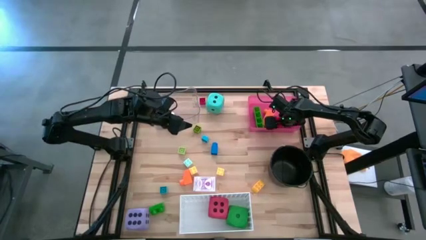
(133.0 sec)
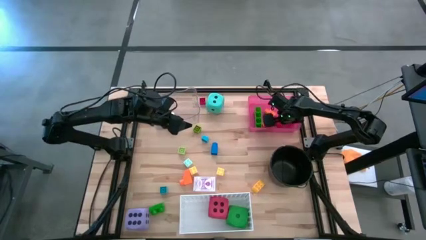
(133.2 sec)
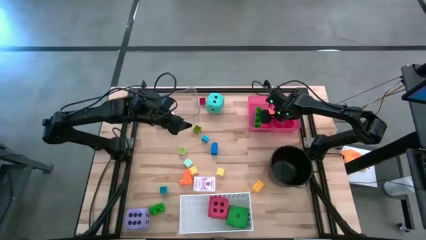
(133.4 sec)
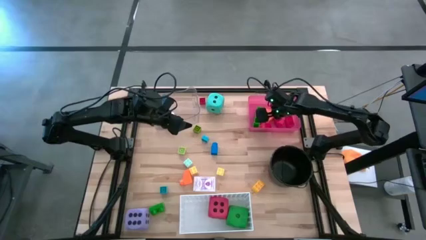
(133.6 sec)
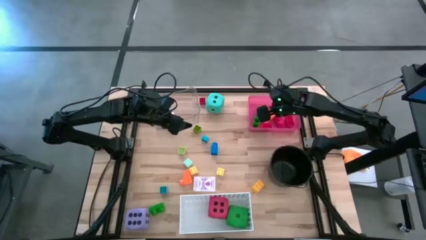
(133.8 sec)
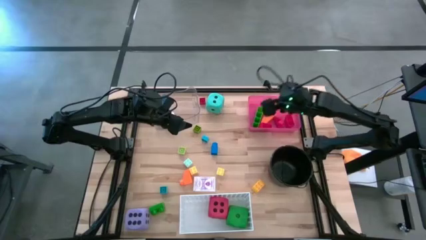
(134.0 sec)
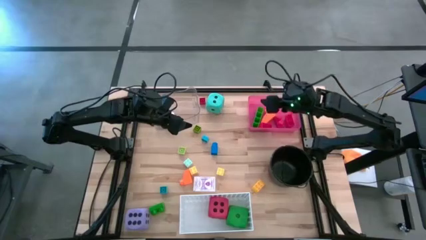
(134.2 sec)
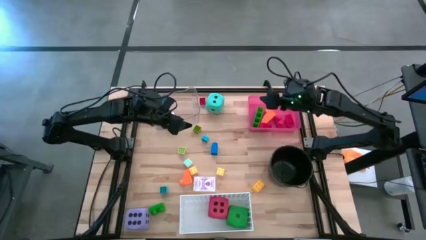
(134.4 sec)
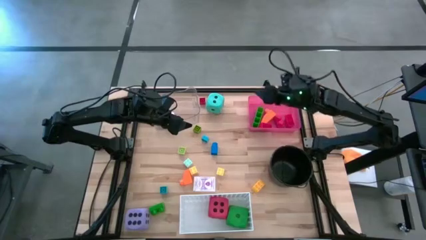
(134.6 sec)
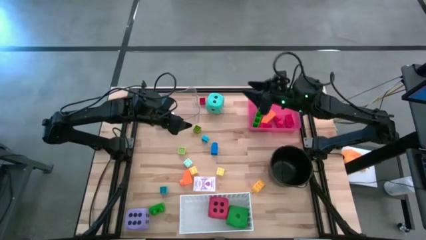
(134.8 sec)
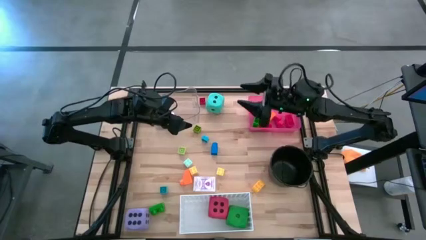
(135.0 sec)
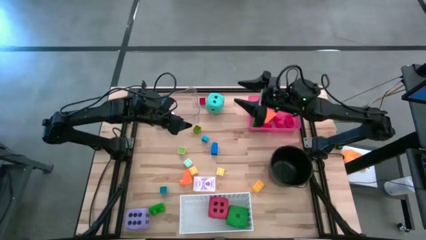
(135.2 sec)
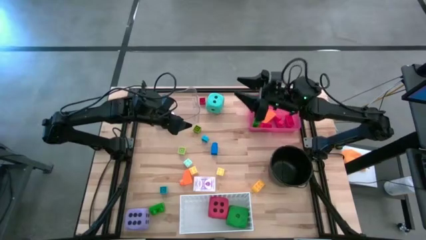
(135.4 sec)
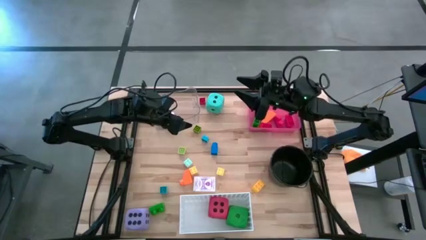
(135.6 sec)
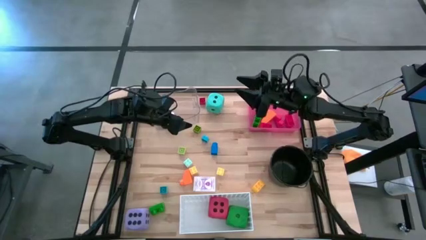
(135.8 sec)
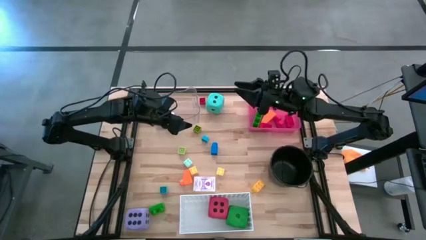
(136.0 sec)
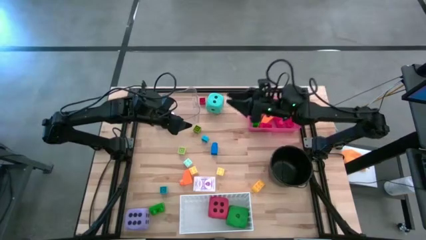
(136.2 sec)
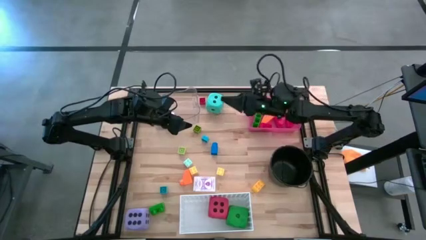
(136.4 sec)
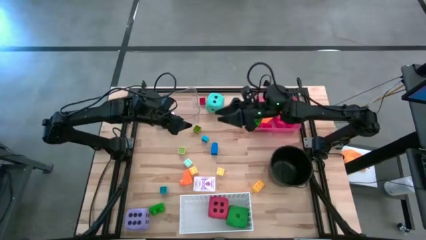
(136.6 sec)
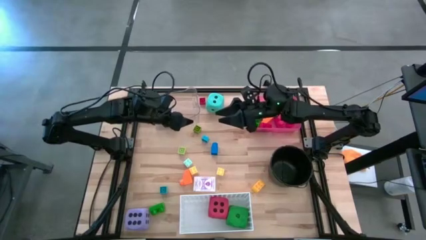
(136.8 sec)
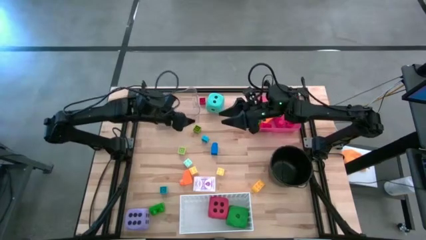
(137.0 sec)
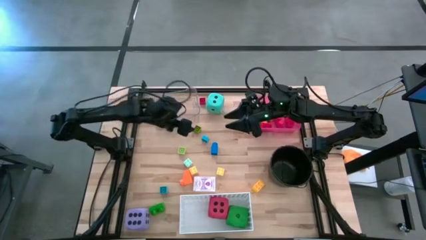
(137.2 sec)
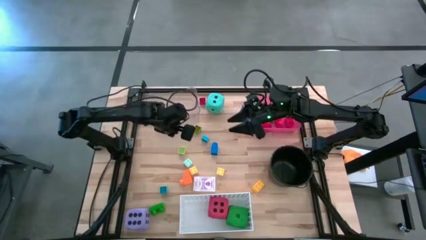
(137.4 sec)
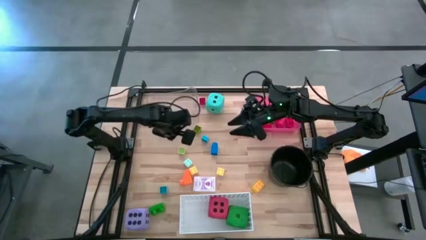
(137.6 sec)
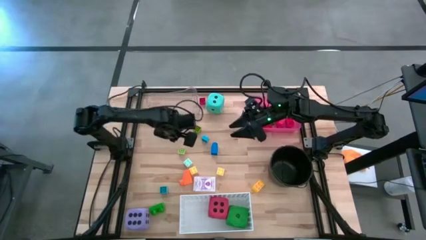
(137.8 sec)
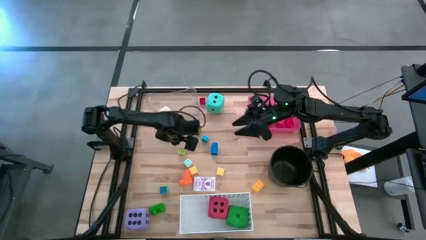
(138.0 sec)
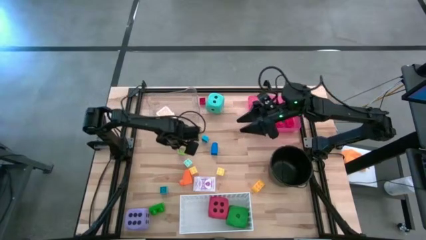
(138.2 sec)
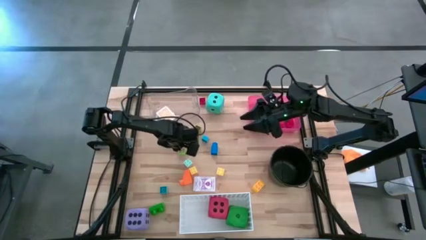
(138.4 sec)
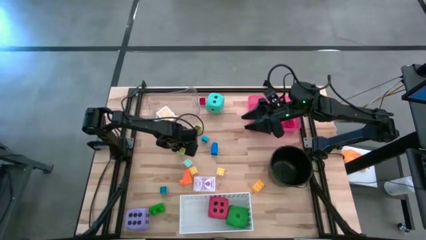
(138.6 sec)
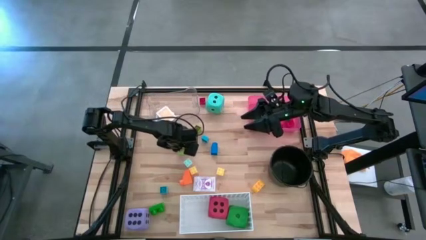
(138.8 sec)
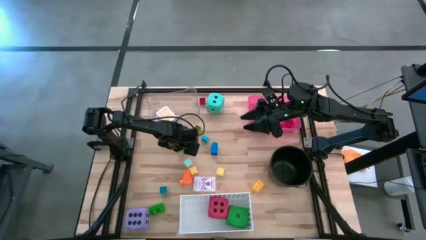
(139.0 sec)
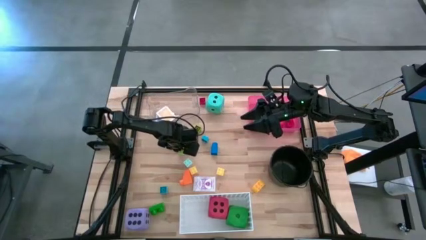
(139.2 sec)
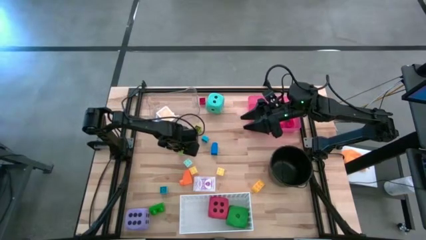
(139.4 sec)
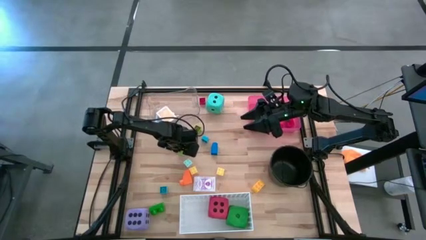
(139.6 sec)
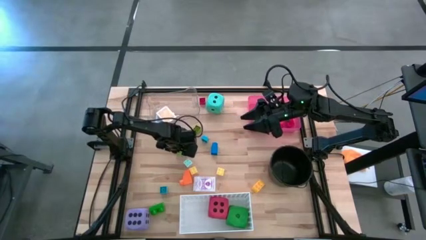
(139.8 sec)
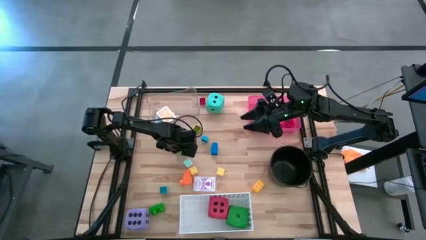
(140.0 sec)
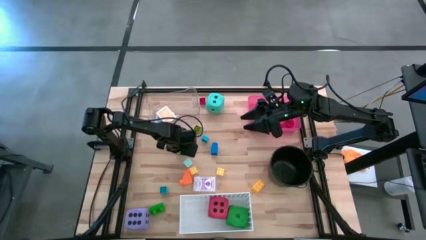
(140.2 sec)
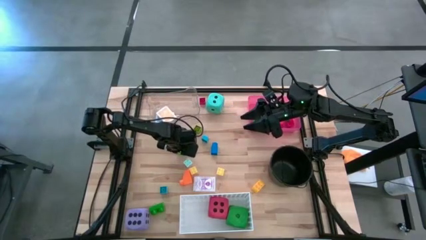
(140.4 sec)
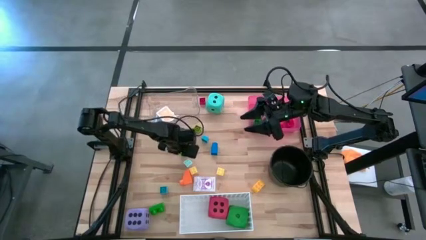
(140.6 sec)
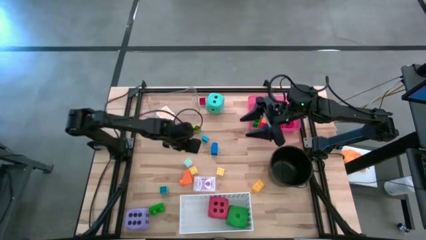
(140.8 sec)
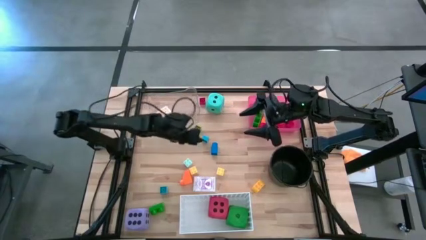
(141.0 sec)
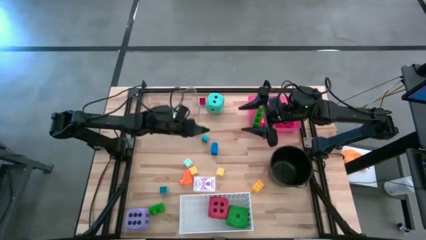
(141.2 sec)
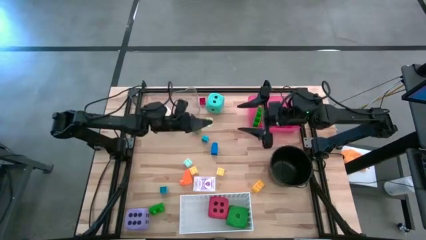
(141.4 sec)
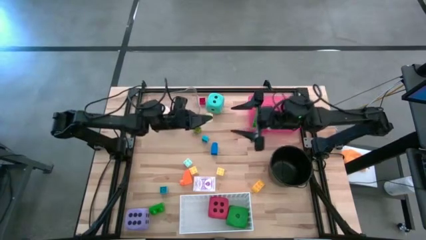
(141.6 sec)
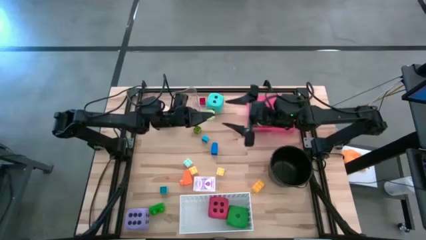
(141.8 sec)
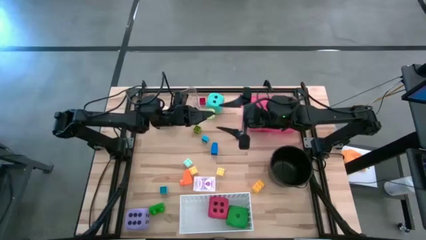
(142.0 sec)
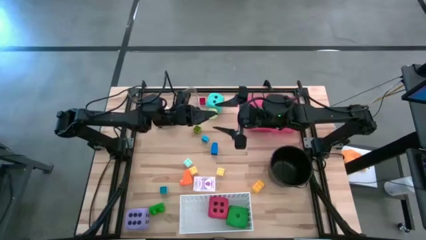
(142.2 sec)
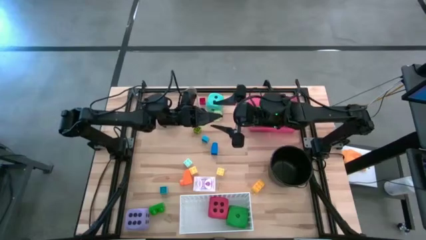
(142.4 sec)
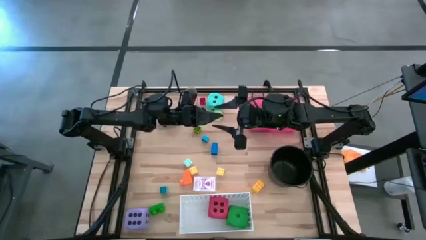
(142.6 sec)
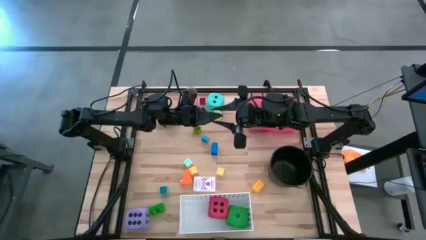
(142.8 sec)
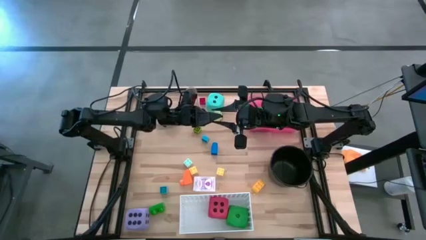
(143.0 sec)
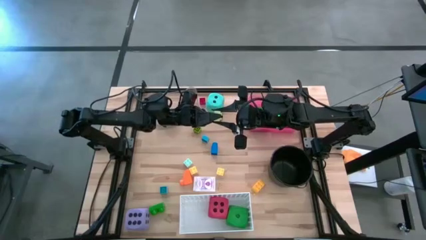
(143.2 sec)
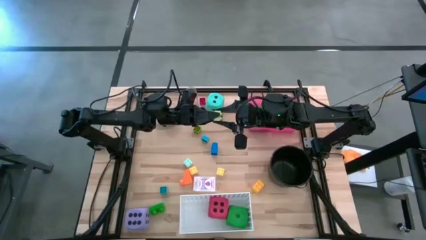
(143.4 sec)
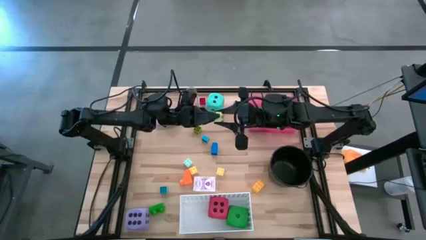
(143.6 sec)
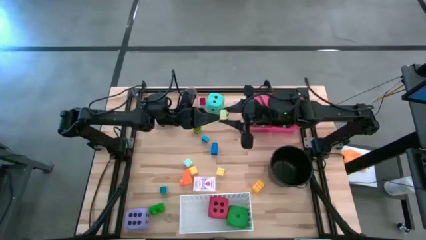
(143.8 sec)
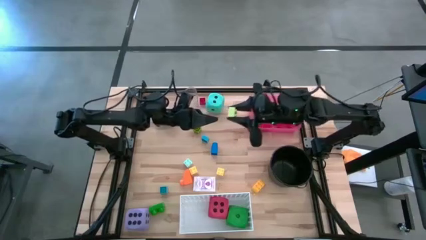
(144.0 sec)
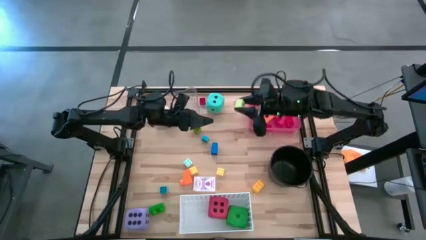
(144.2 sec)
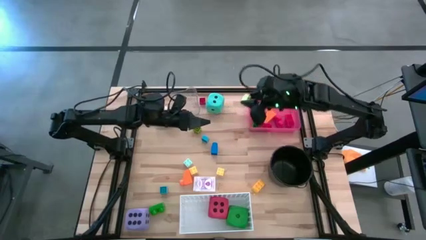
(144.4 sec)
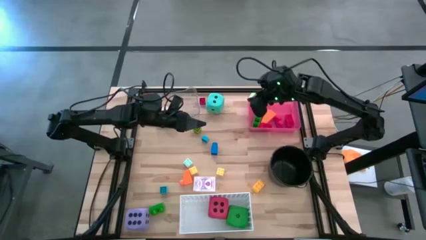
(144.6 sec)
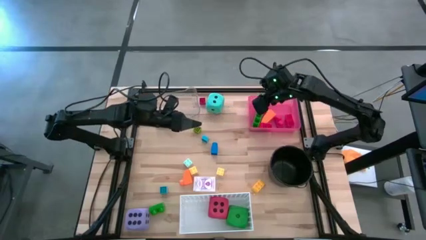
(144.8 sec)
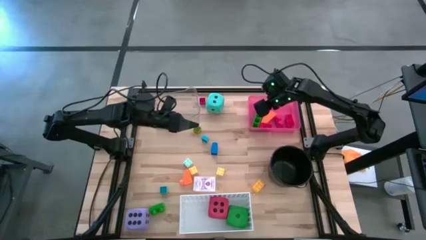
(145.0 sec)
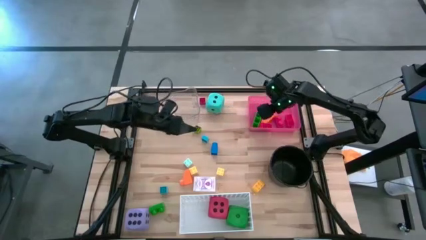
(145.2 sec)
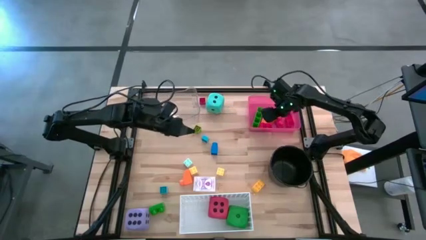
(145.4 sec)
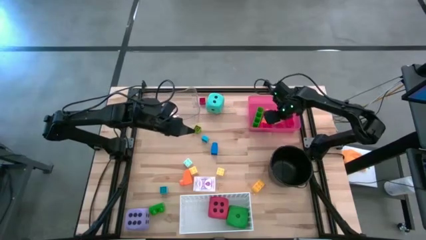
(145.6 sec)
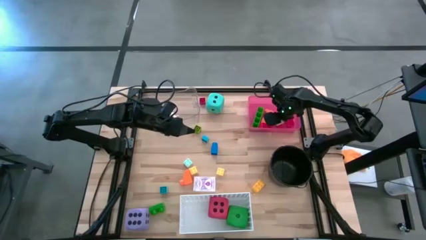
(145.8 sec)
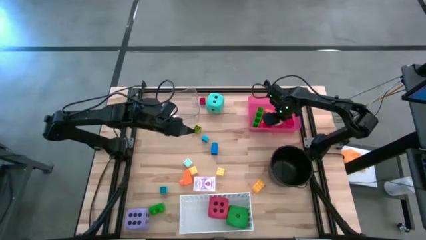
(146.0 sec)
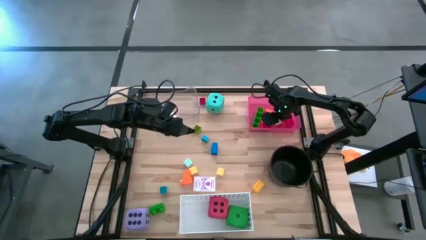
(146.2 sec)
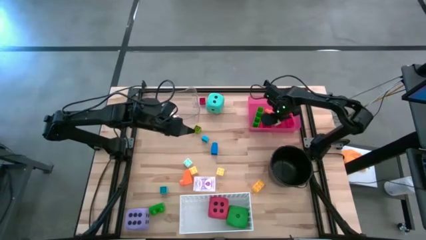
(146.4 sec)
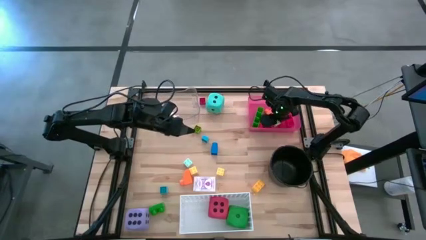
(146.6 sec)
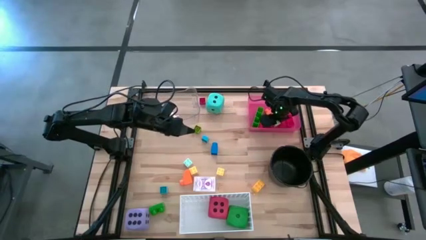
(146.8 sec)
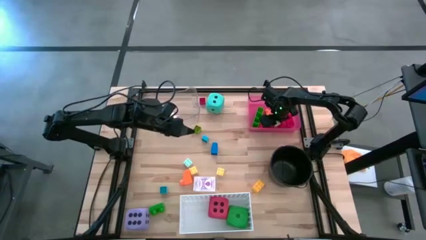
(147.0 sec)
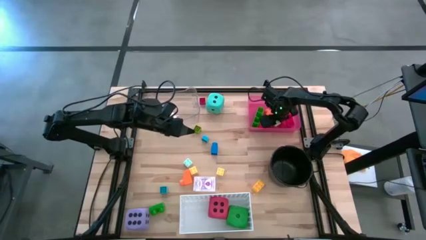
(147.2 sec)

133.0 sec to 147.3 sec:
Task: Pick & Place Toys
Put the light green game piece into the red bin

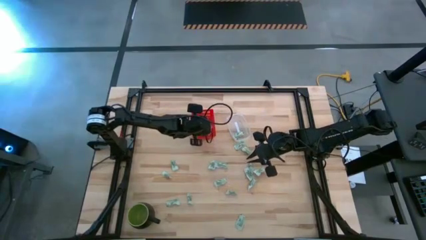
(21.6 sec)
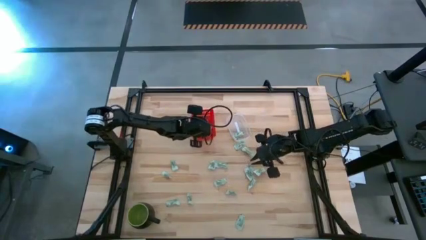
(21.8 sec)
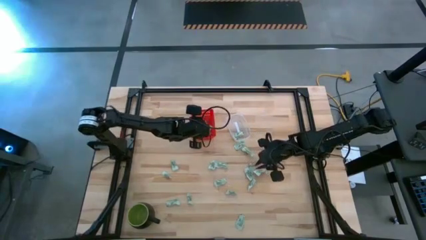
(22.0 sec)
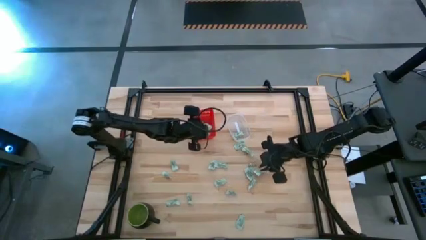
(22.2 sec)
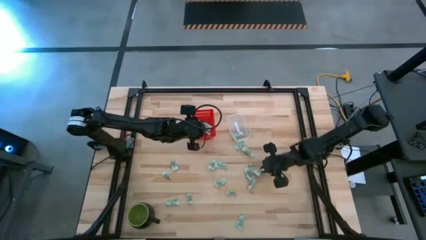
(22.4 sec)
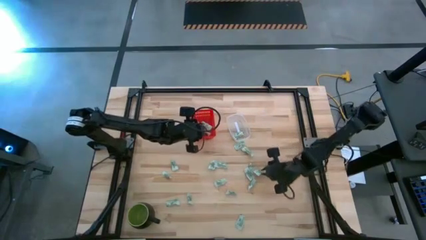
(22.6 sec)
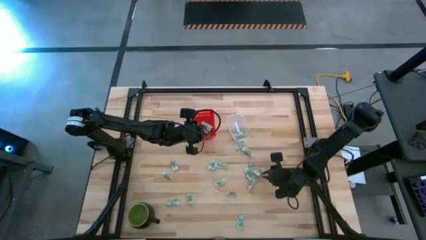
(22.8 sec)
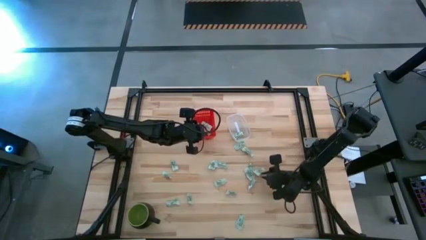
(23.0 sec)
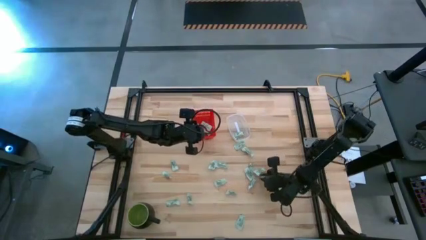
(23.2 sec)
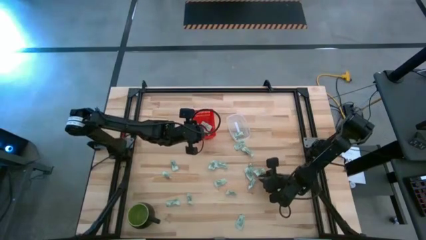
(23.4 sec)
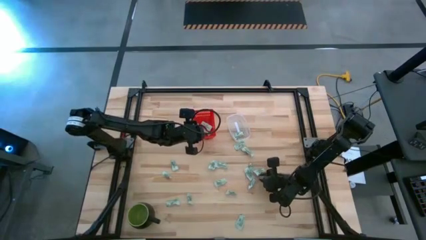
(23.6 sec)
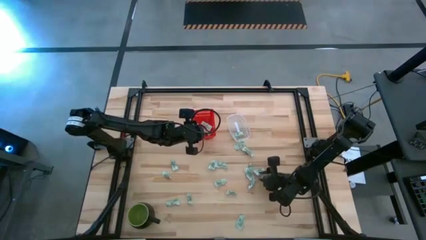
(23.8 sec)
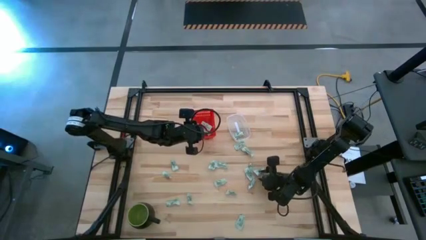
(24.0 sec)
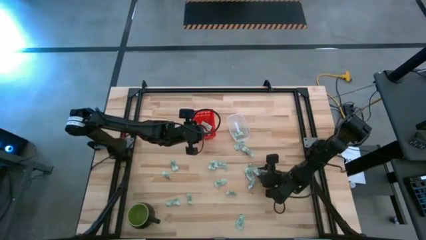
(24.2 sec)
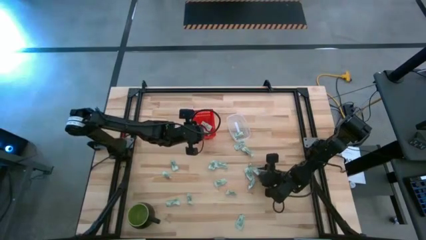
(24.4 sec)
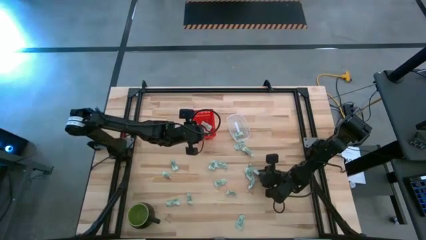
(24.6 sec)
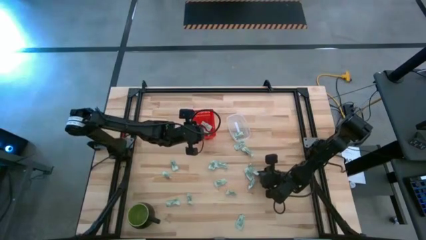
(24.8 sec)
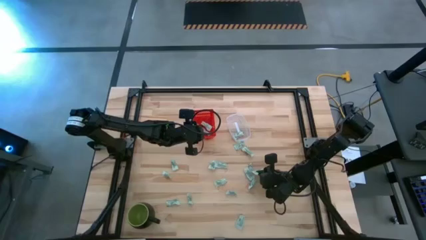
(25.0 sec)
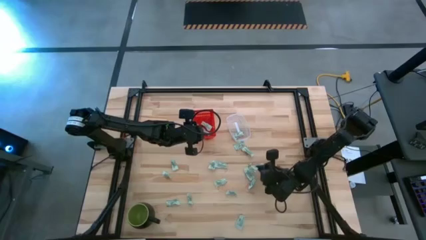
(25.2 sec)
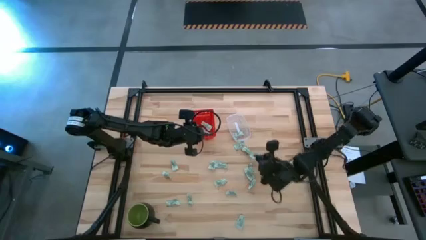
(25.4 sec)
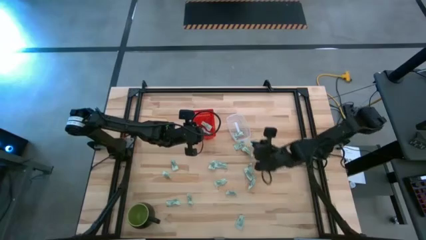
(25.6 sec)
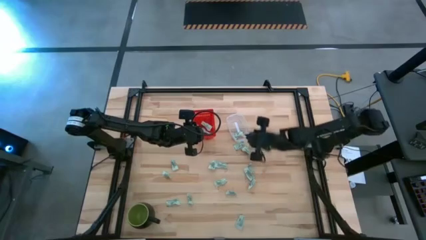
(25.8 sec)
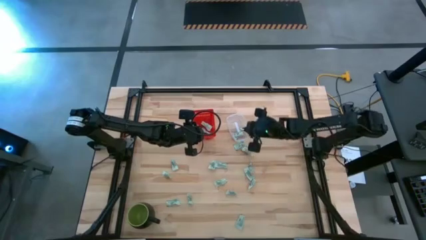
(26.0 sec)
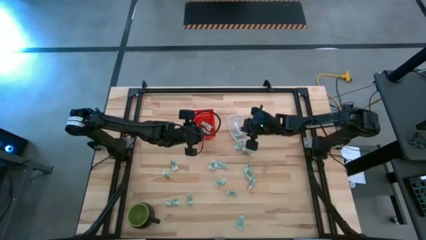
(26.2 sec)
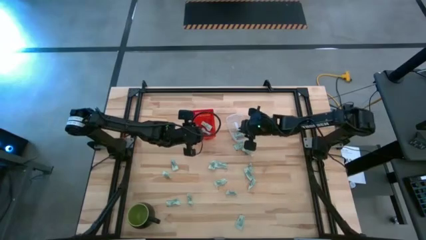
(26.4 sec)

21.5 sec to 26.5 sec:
Task: Pick and place items into bin
Put the white stevia packet into the transparent bin
